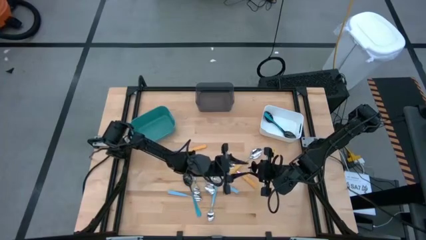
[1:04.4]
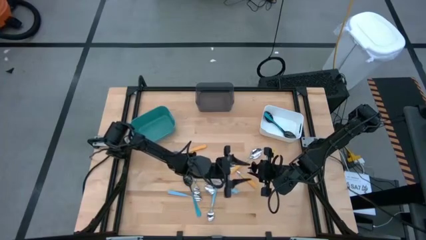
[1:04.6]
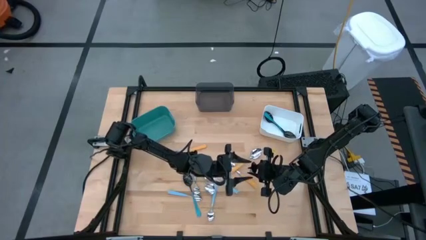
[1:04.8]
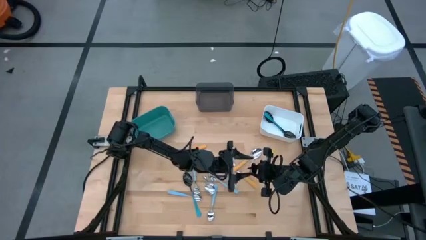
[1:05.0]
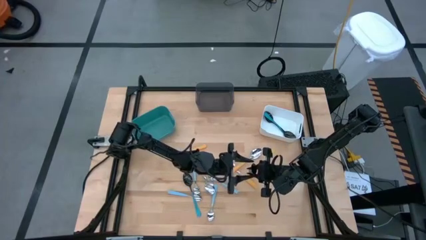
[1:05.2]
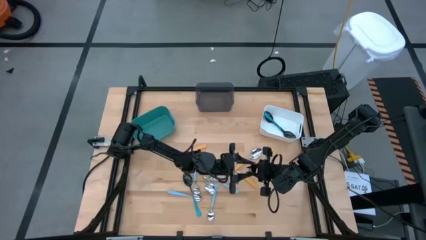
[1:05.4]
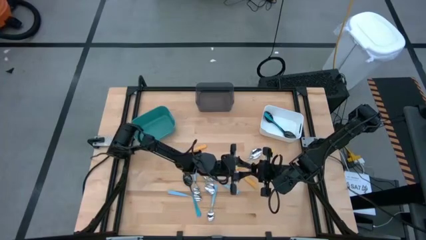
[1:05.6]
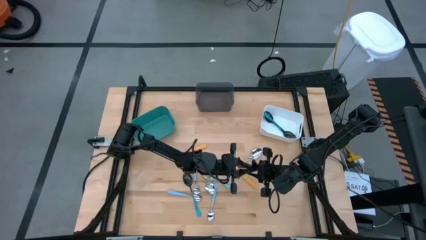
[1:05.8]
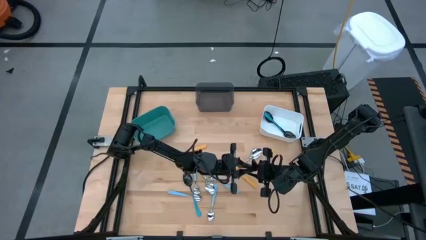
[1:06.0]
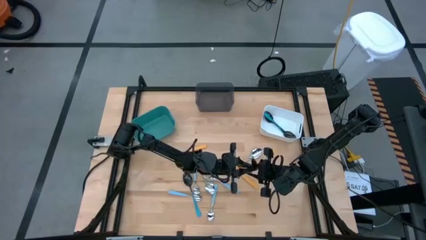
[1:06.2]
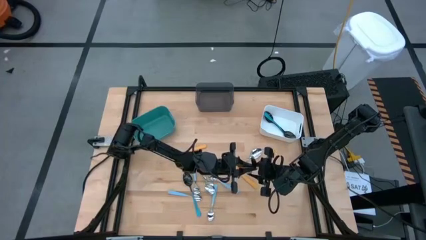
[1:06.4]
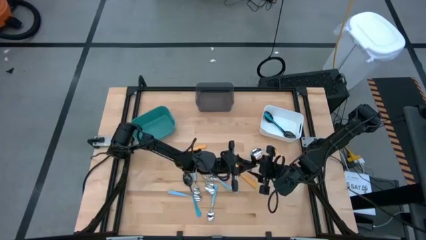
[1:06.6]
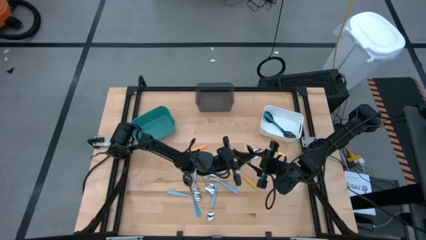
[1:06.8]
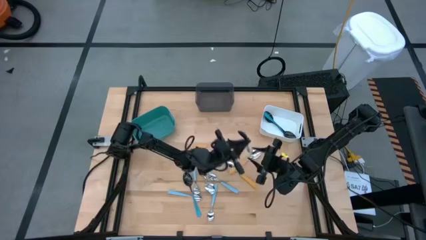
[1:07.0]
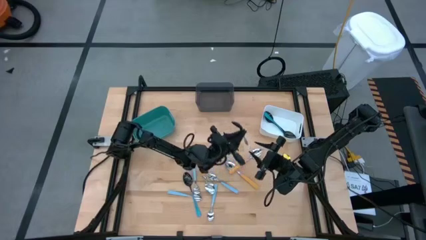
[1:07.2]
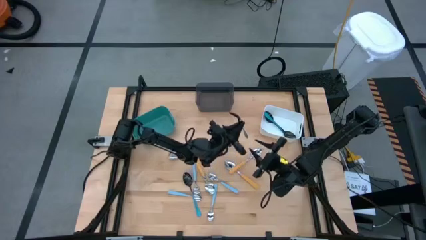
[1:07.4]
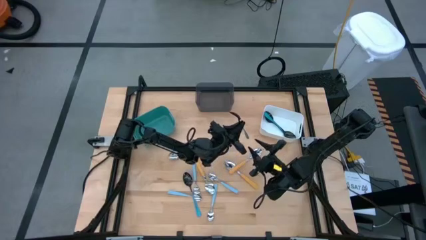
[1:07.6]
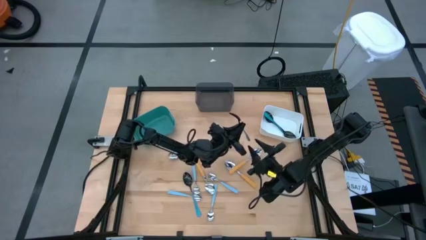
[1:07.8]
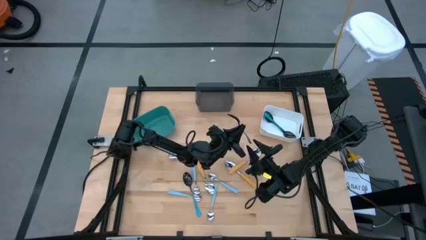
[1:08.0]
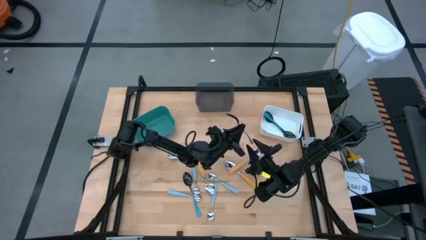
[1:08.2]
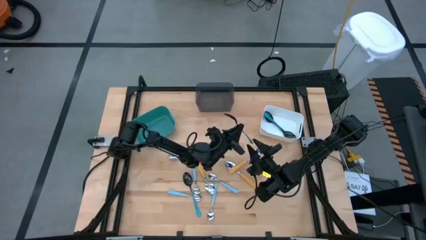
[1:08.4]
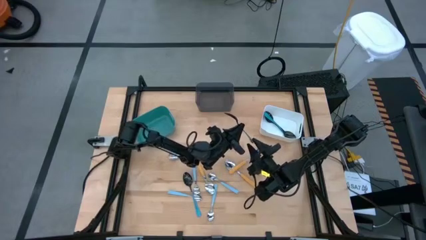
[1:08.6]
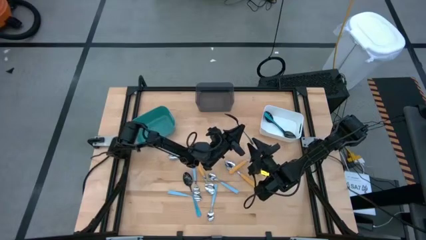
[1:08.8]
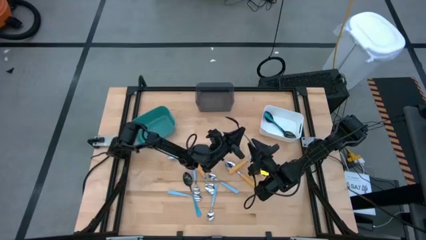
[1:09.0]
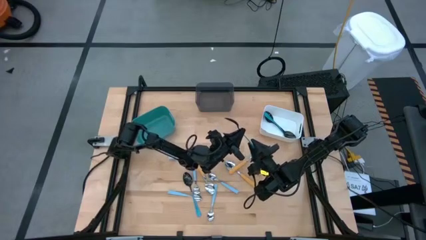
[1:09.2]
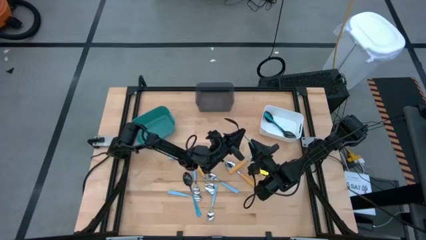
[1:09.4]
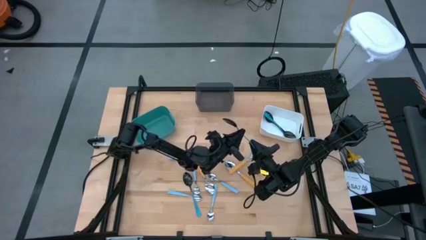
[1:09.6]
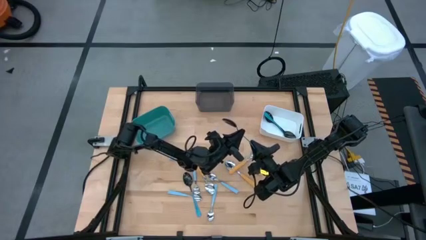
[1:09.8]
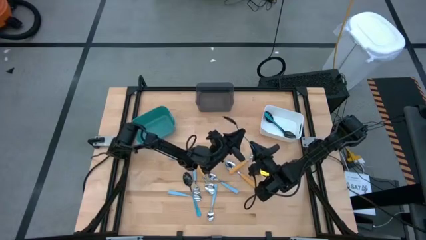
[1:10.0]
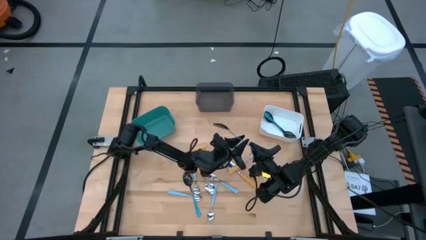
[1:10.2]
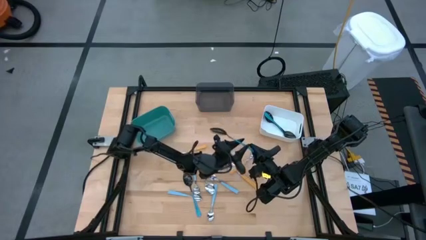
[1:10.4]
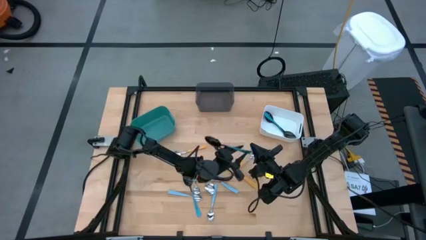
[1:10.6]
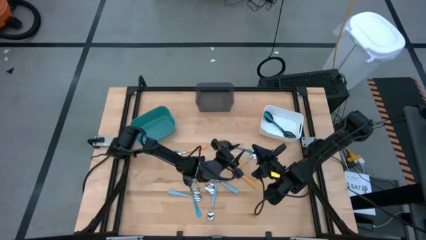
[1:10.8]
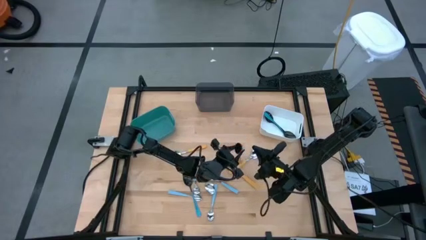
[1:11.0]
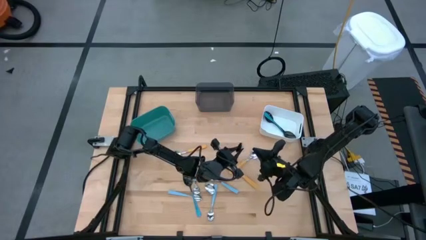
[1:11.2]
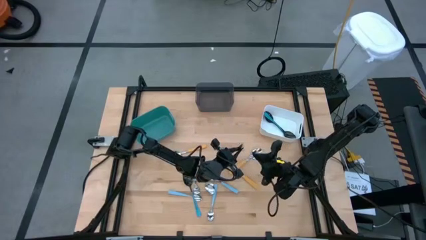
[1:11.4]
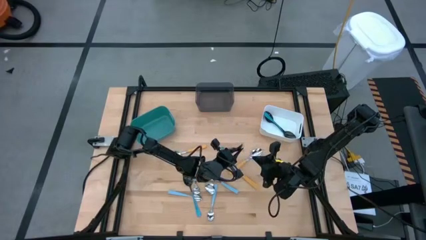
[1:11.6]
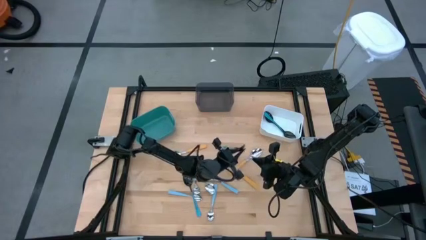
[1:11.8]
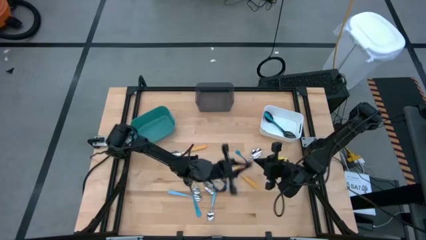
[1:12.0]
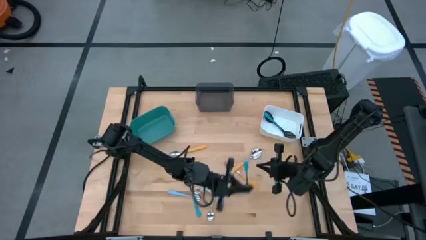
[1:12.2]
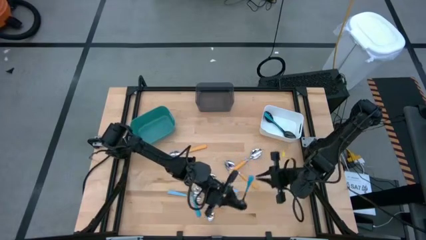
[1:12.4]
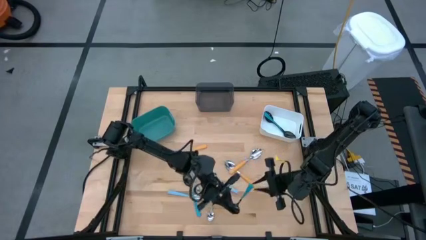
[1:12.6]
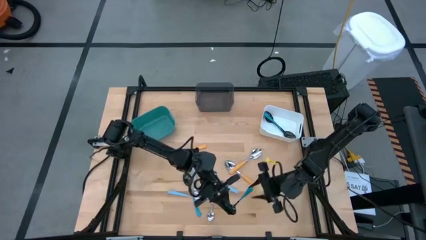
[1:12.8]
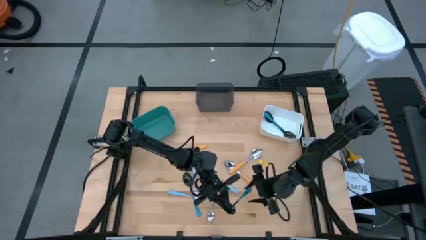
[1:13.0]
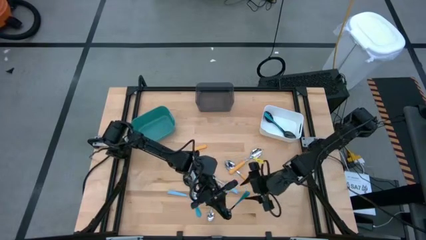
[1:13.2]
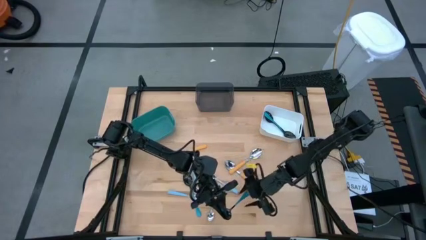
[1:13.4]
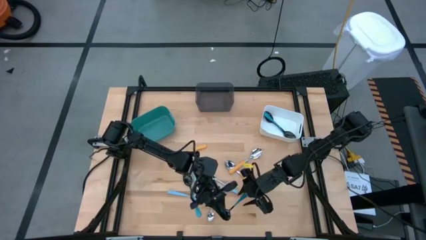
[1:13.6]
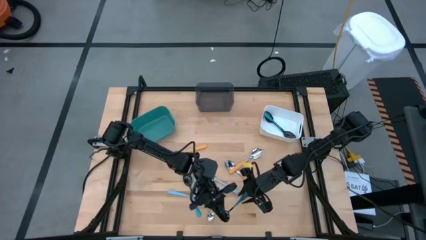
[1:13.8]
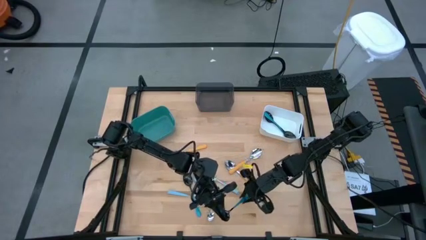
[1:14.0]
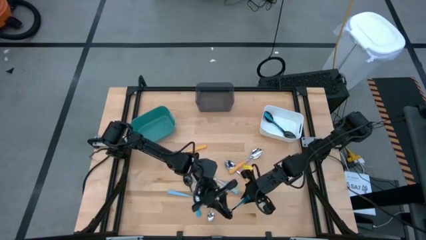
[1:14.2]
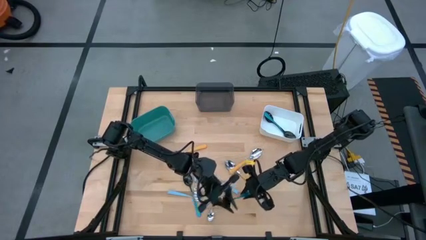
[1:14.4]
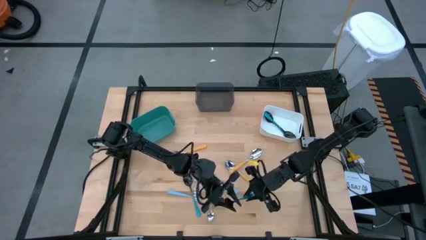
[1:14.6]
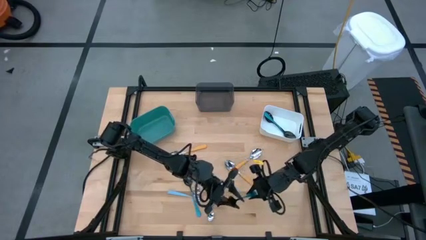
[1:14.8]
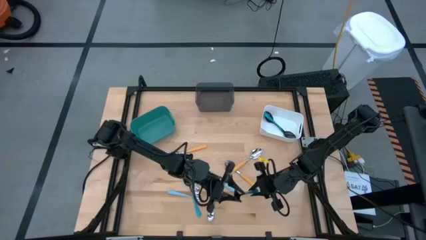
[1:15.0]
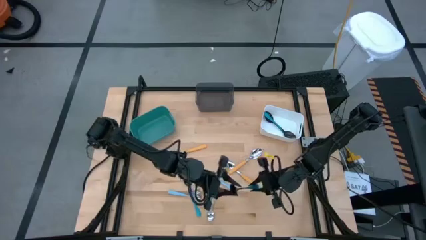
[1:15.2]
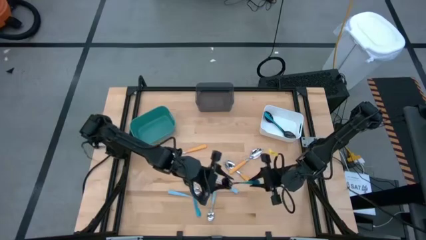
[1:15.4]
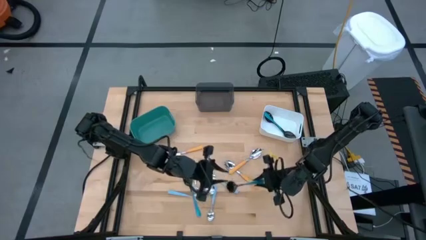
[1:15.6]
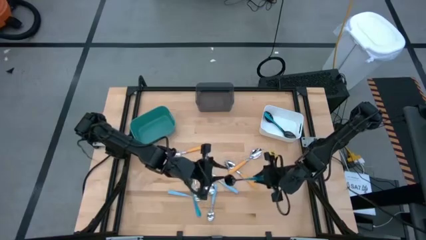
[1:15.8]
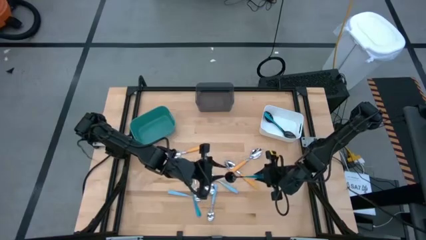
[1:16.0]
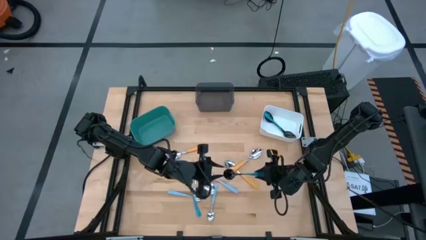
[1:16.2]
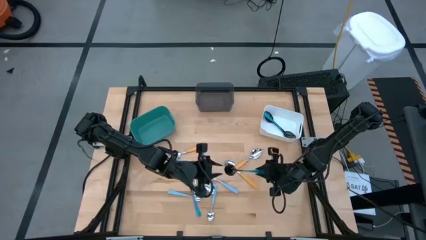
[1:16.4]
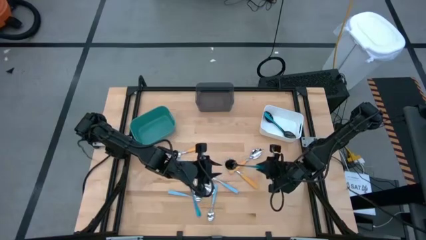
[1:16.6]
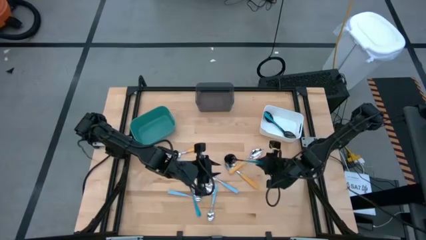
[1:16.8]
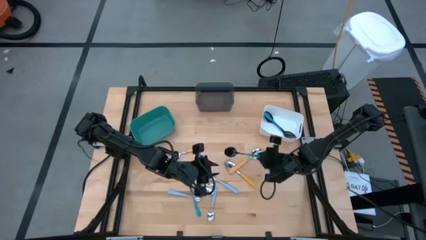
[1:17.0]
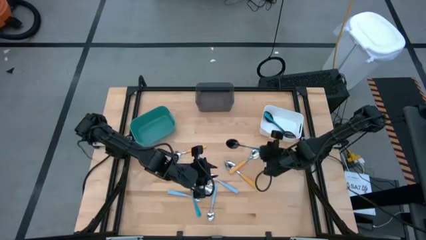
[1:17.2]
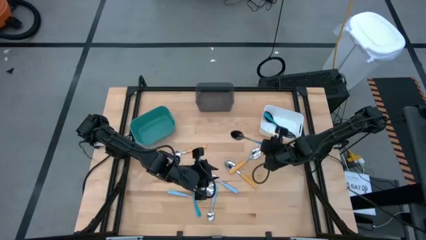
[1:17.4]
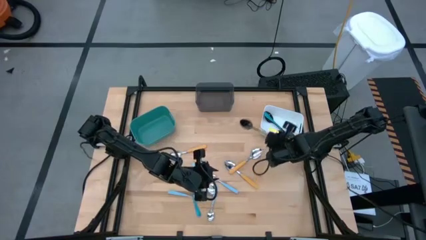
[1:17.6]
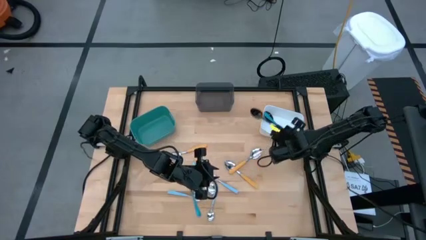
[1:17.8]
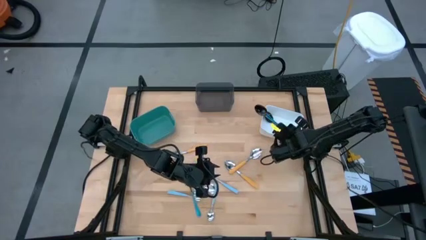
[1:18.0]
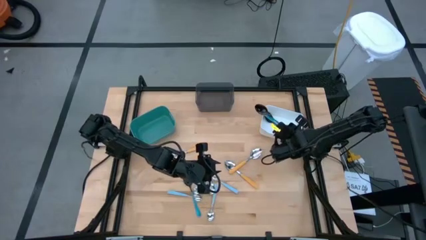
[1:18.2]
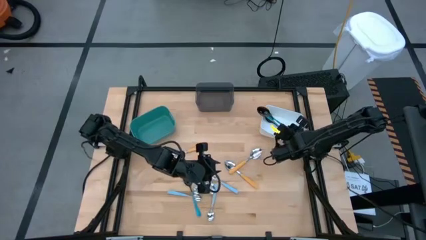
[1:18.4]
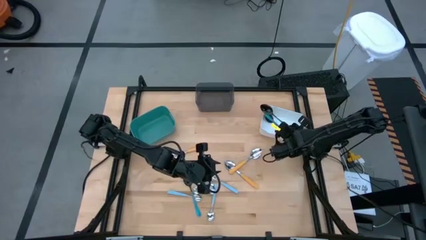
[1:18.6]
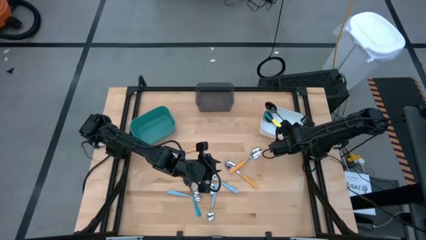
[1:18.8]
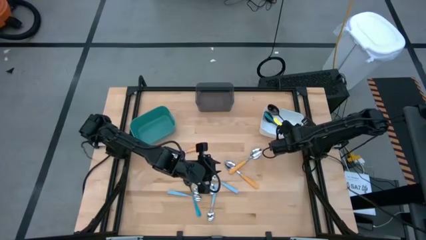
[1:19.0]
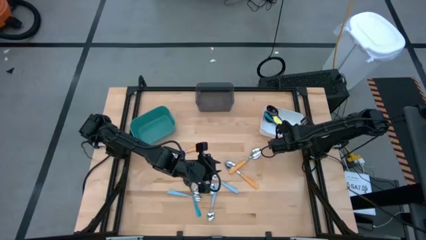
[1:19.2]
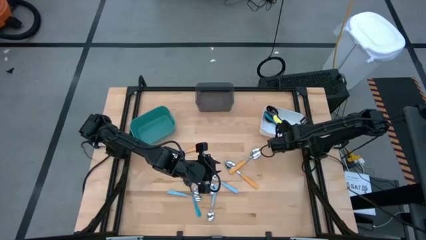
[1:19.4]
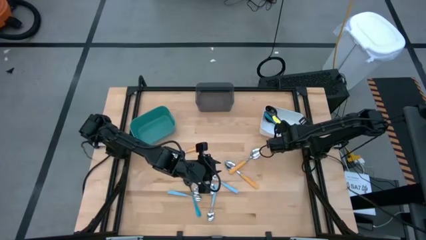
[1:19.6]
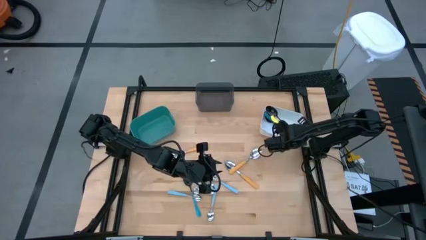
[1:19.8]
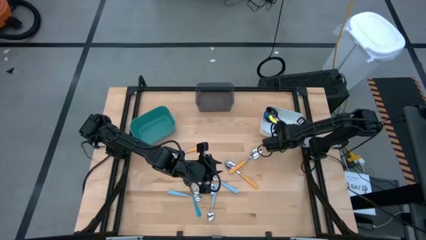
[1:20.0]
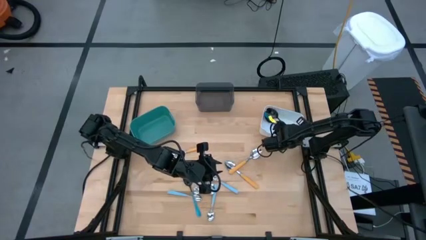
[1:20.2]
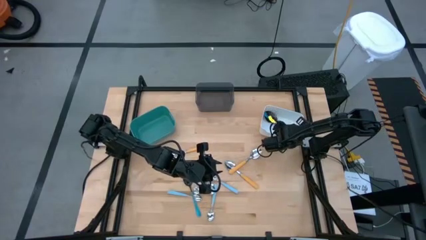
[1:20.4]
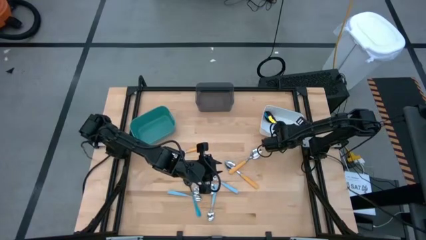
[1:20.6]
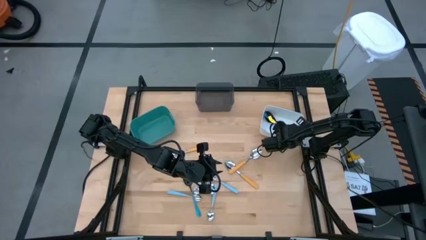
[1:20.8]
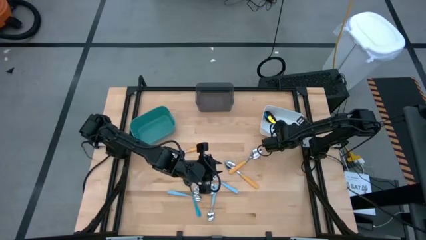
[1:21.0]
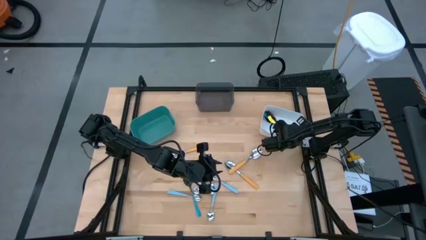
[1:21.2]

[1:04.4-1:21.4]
Task: Sort silverware by color (type)
Put the blue spoon into the white bin
